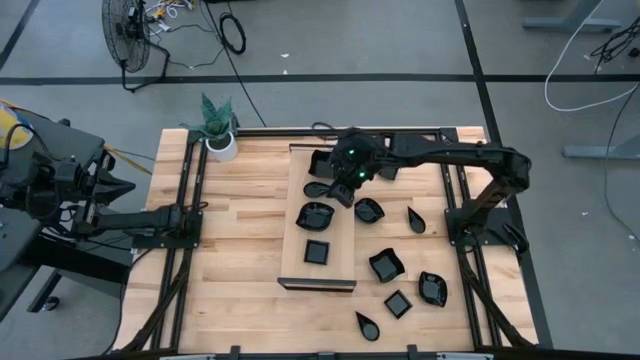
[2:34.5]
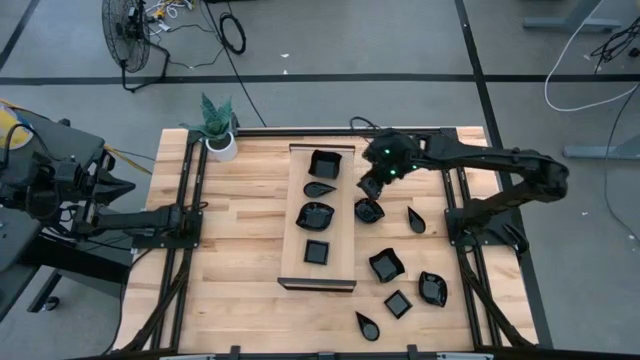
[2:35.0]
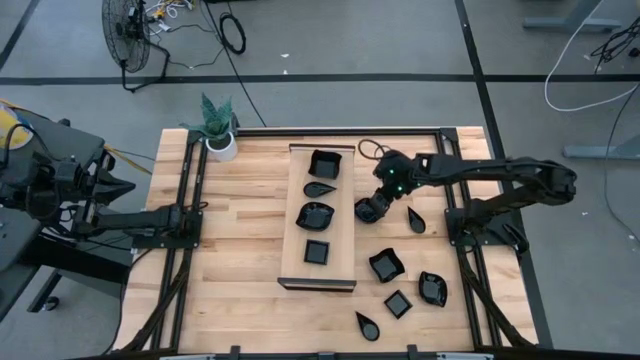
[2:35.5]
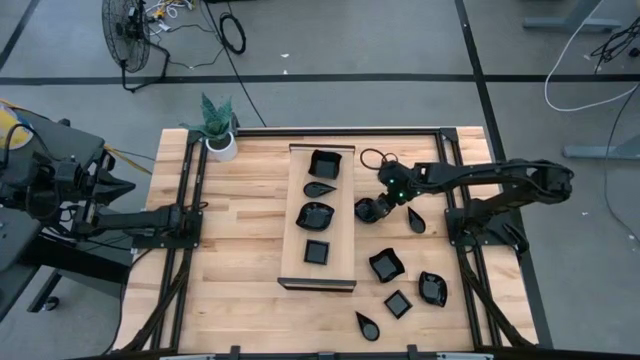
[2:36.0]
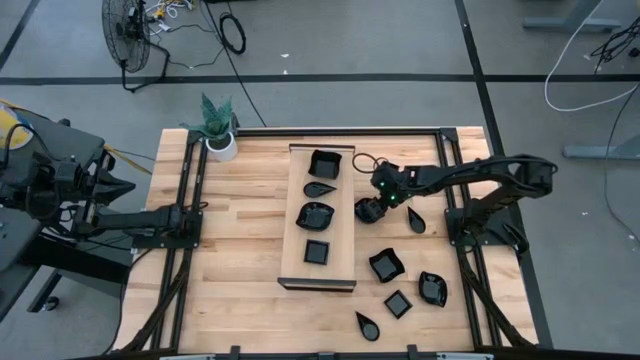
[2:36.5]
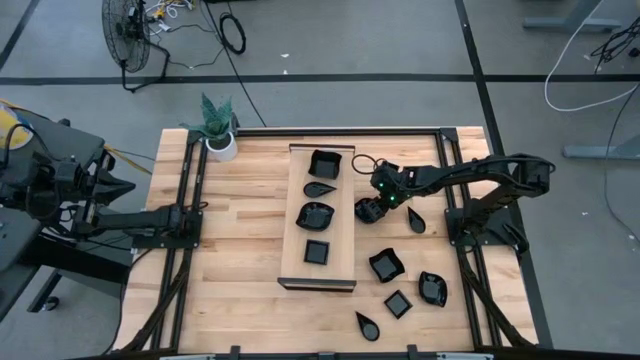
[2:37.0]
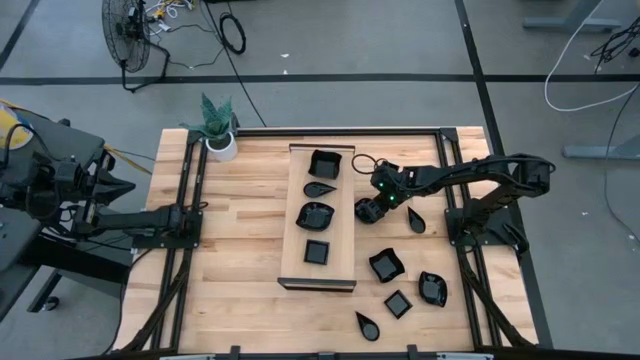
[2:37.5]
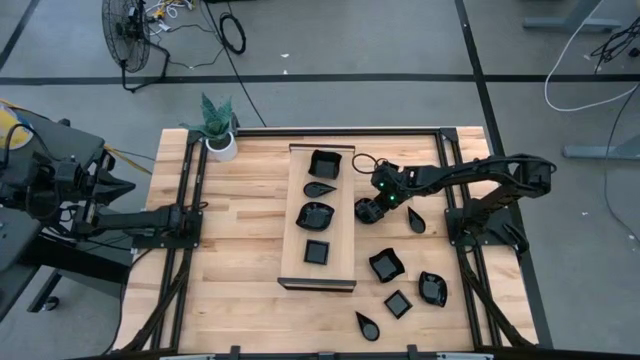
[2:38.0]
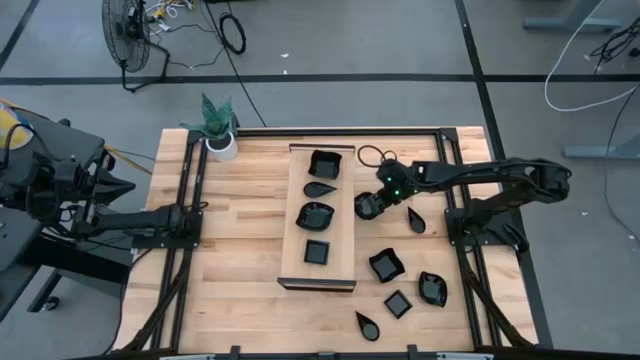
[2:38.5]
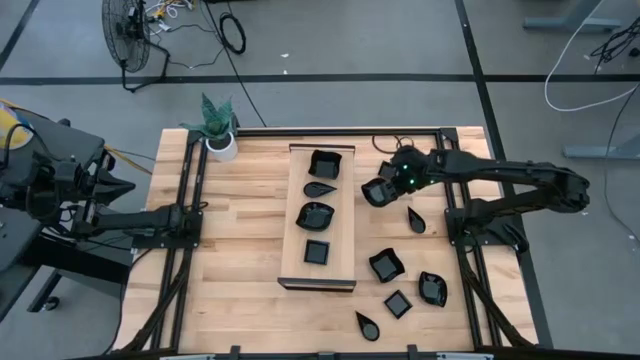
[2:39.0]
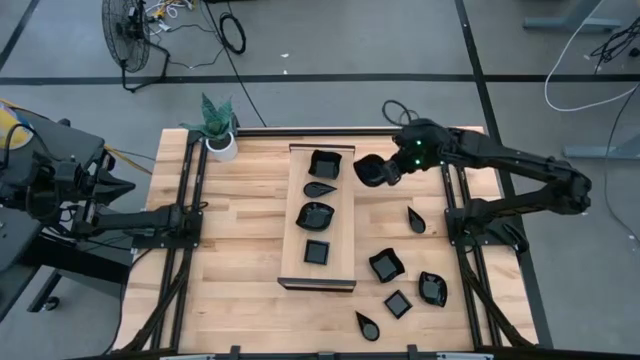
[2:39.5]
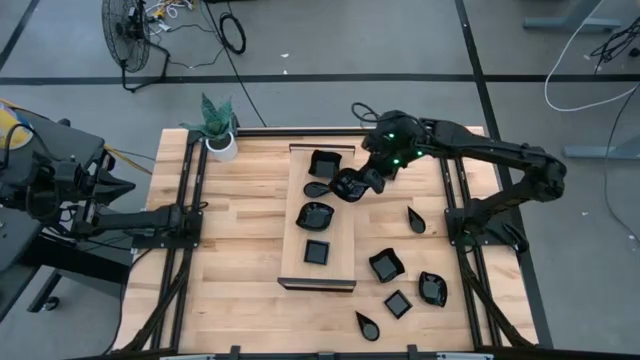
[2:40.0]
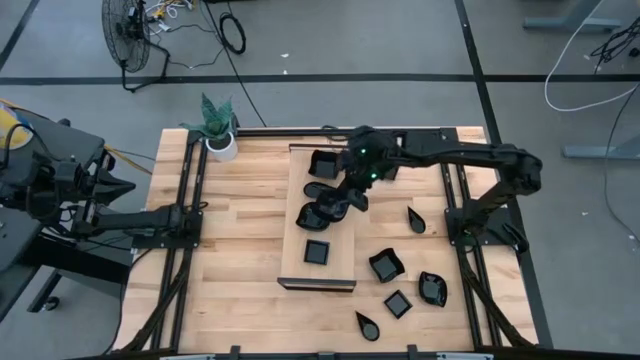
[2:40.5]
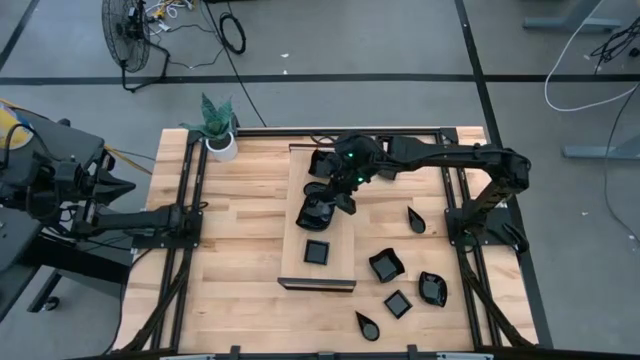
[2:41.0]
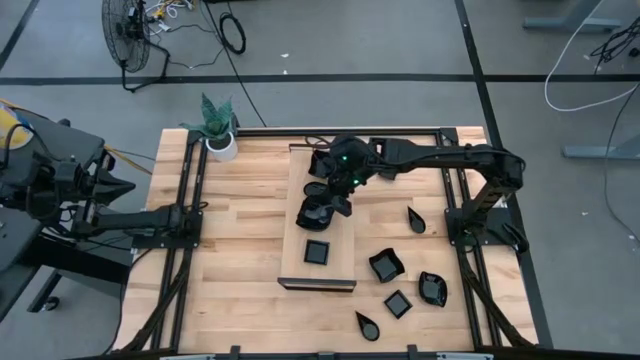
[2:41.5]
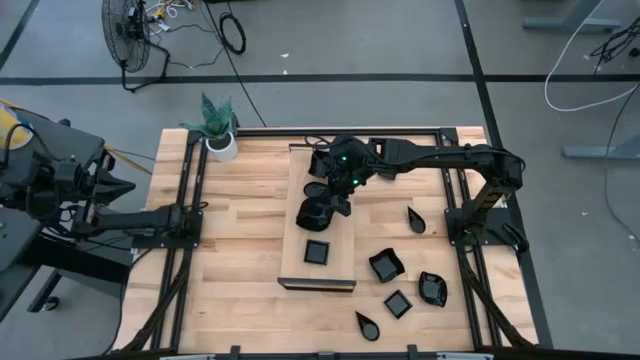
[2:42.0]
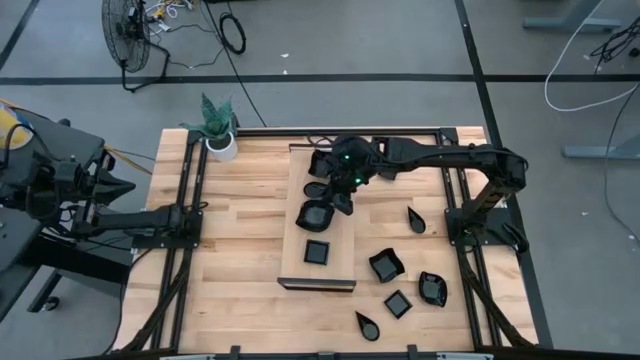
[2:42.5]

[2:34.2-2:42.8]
Task: Pick & Place Mini shaped plates
Stack the leaf shaped plate on top of the leaf shaped plate on the shelf

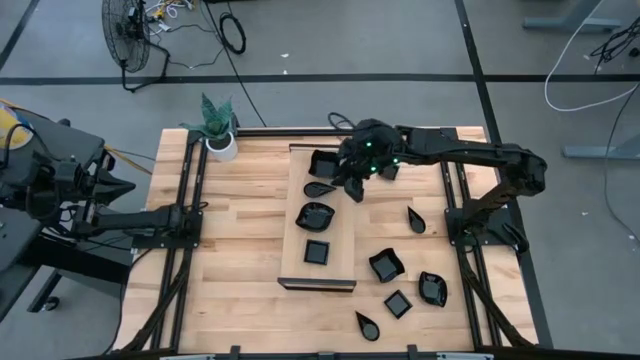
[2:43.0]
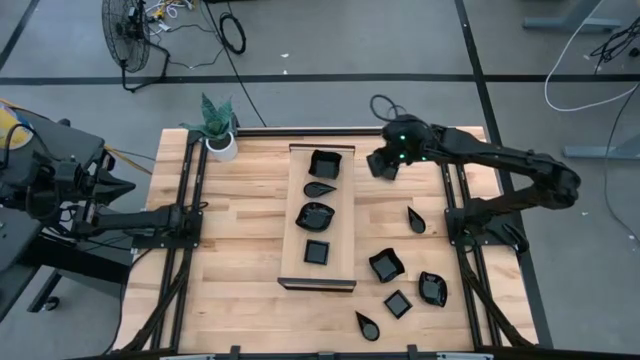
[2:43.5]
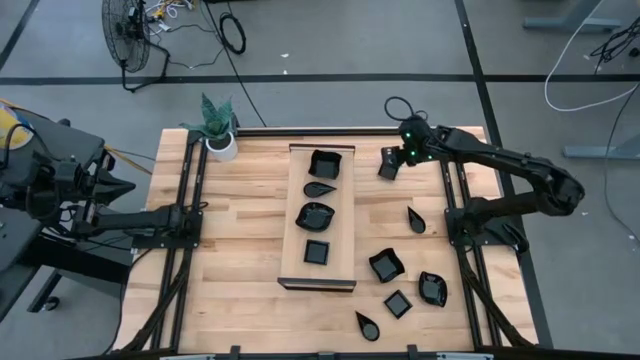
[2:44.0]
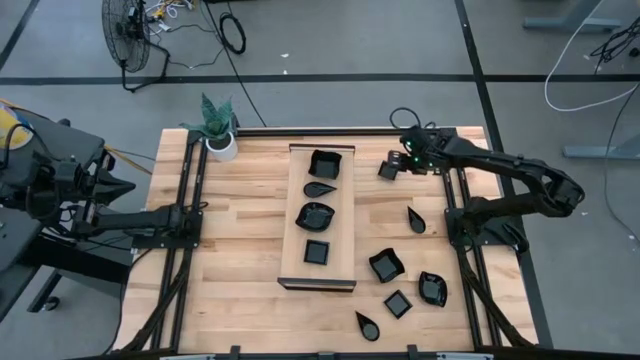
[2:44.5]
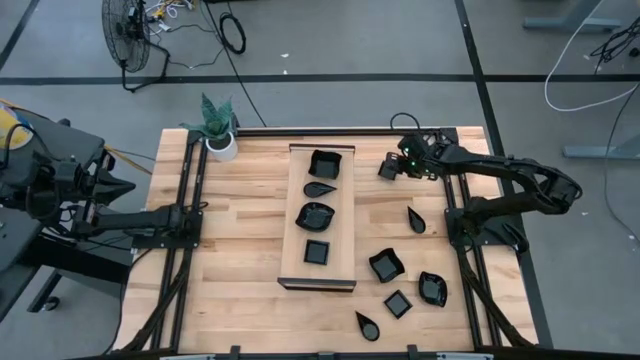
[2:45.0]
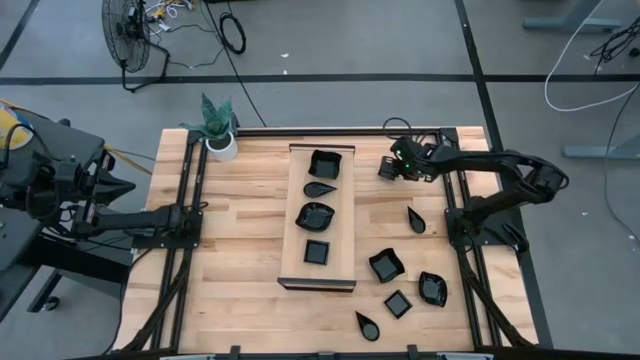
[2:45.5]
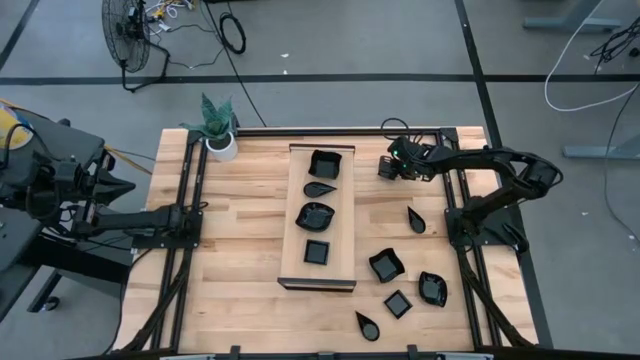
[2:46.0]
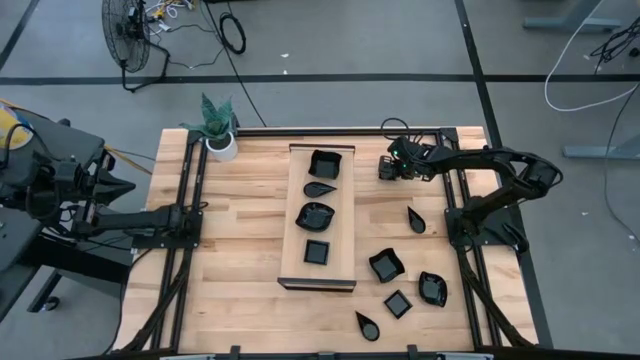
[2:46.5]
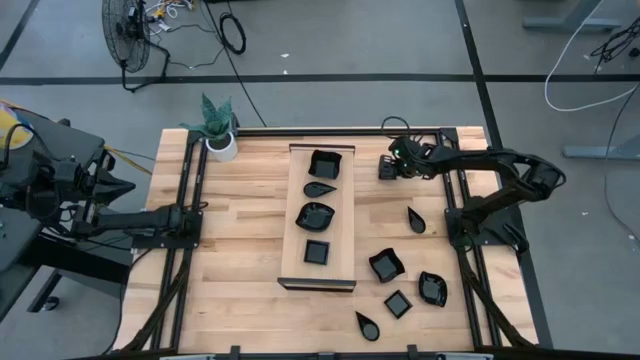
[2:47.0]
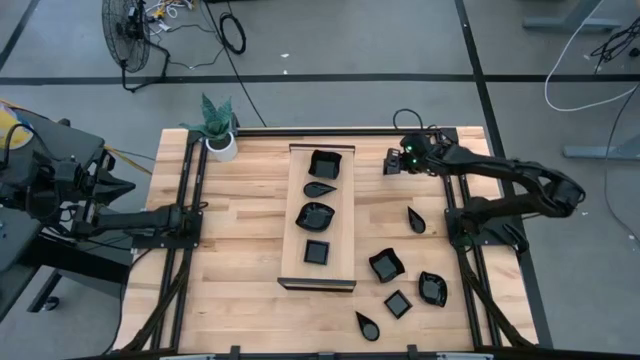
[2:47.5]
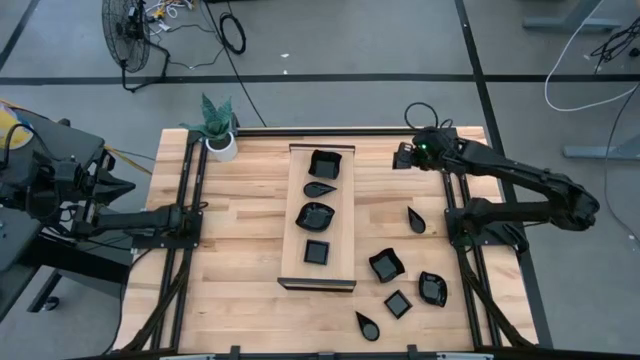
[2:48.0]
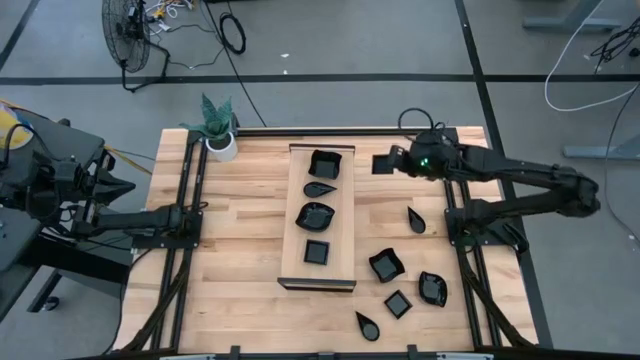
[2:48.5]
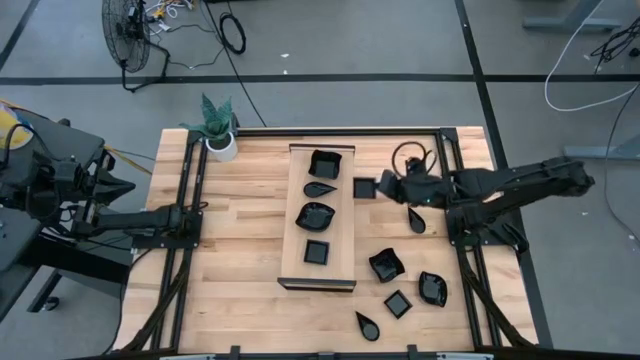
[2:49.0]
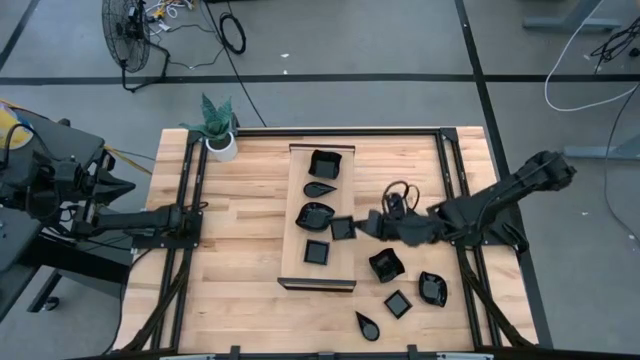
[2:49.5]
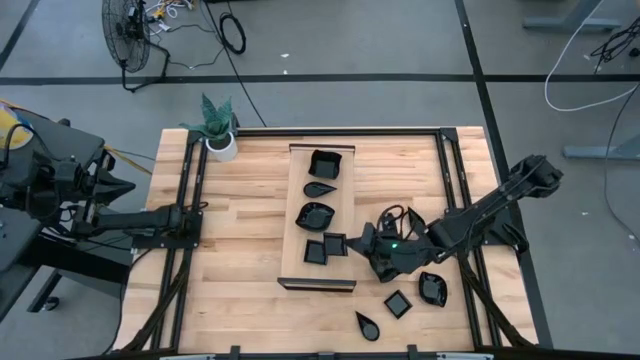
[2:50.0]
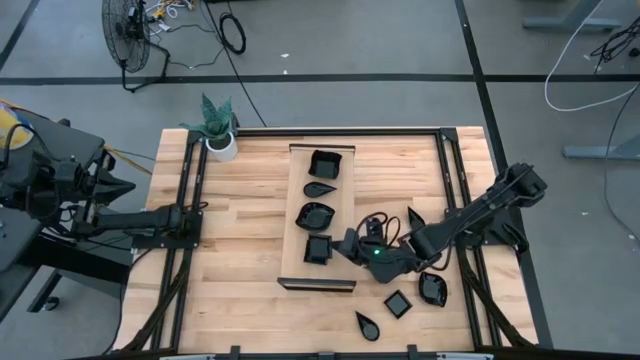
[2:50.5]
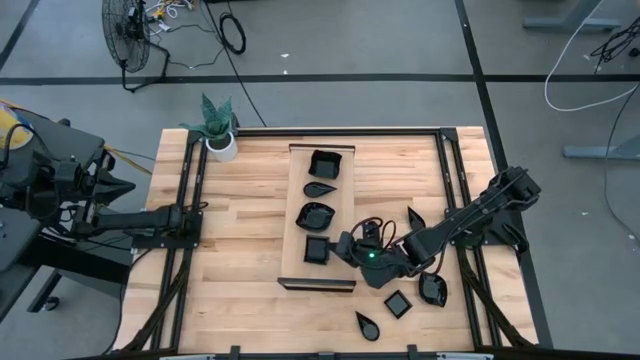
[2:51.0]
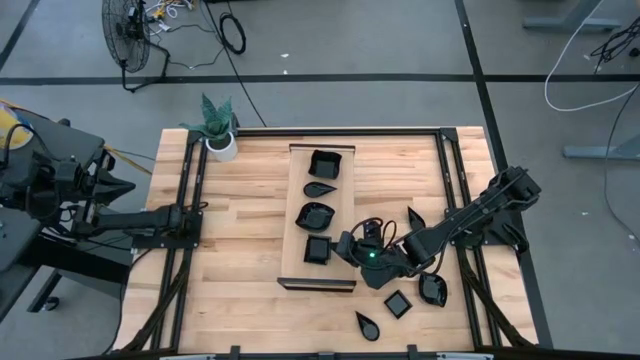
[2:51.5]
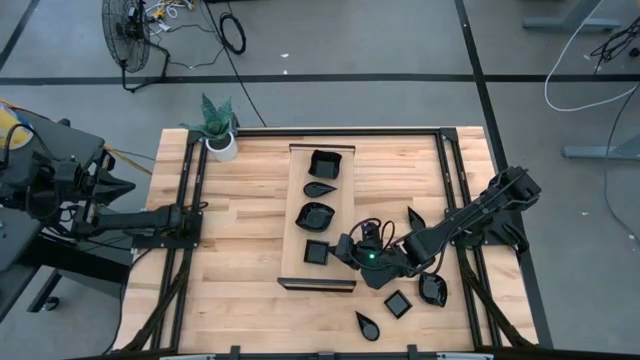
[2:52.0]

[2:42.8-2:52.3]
Stack the square plate on top of the square plate on the shelf

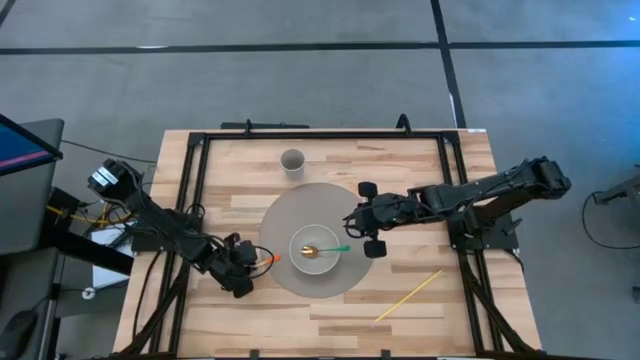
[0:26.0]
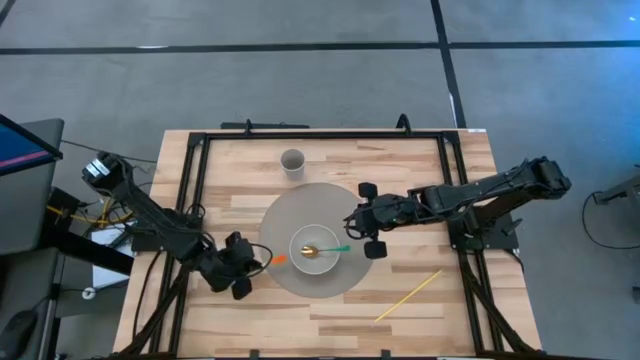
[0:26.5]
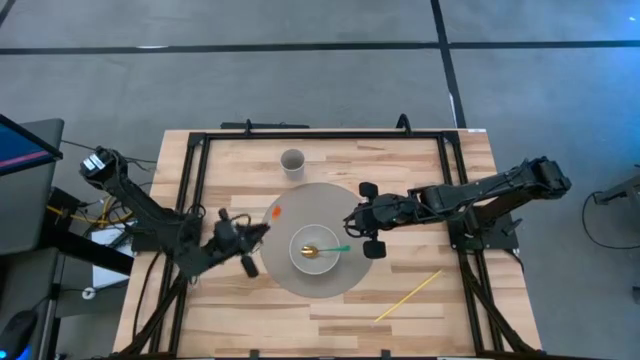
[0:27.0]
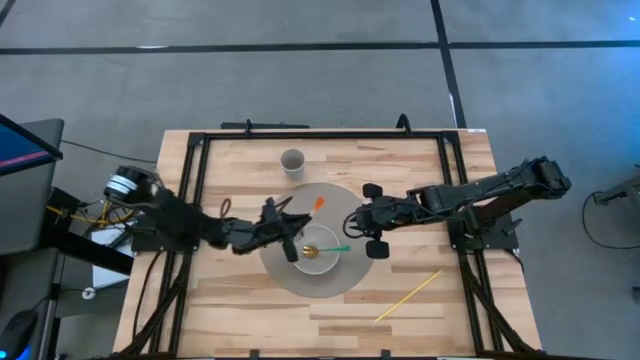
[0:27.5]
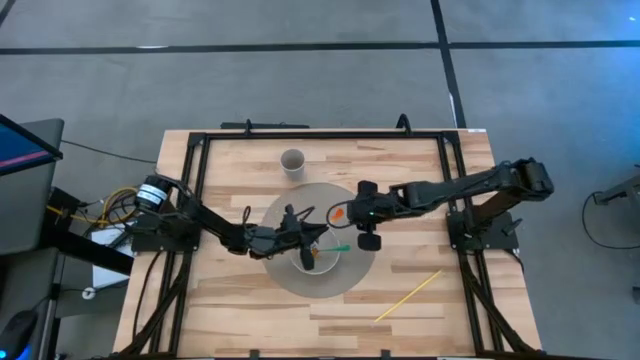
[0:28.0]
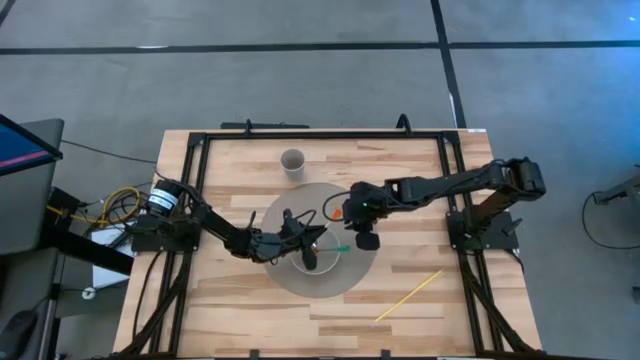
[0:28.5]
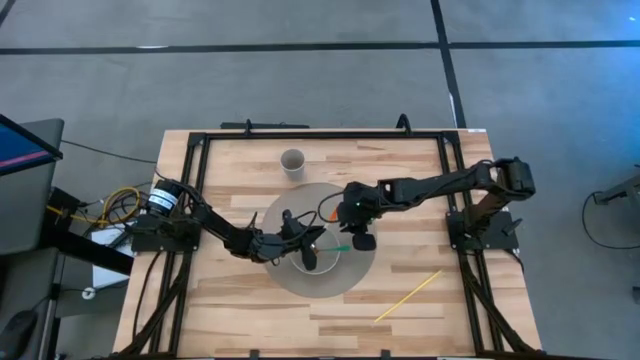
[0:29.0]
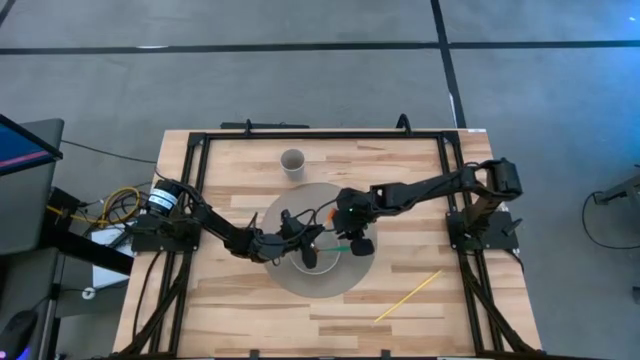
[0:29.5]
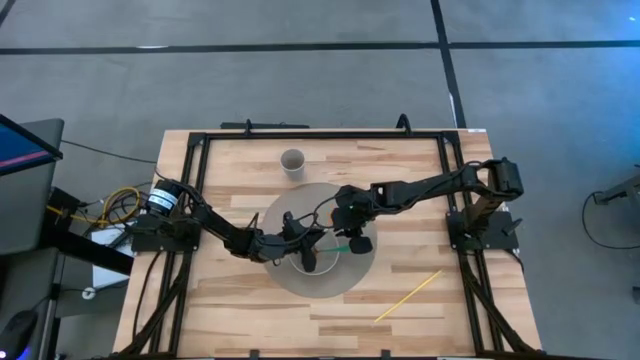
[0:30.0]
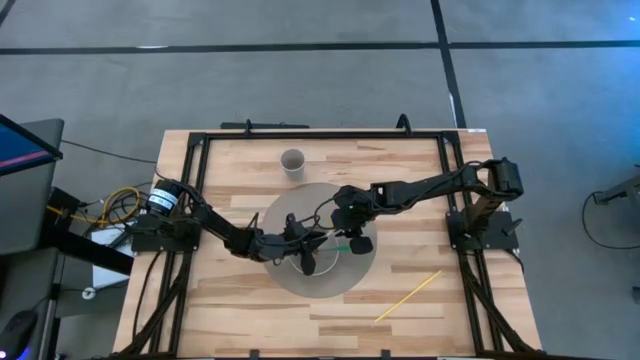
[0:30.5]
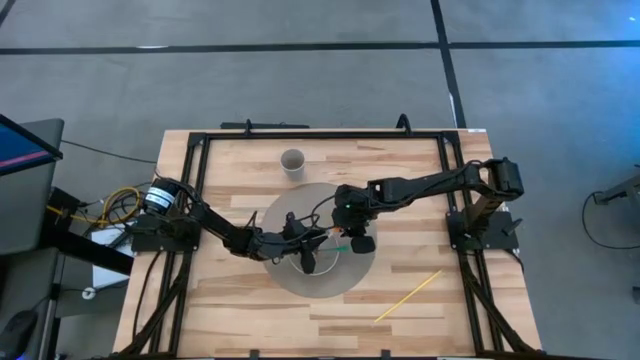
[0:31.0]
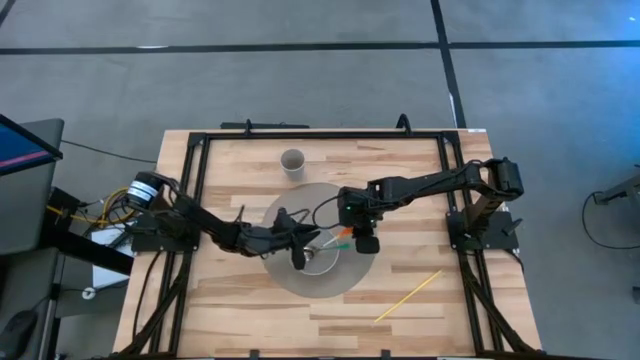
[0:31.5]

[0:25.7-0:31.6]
Task: Pick & Place Utensil
Put the orange fork into the gray bowl on the placemat
